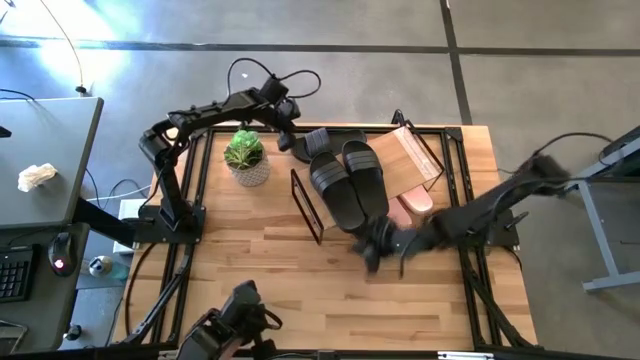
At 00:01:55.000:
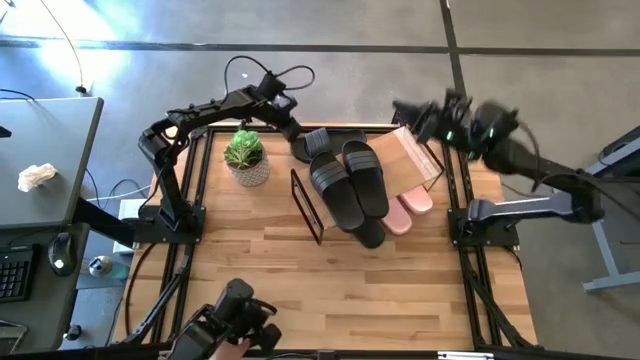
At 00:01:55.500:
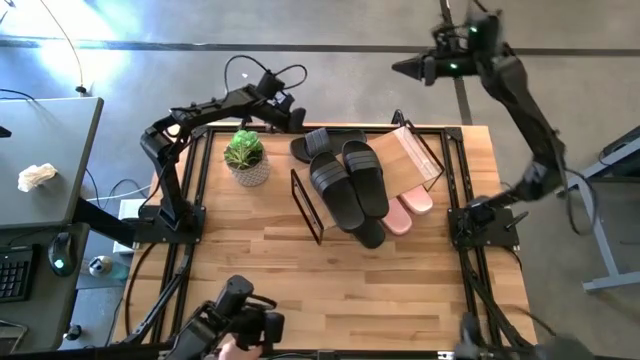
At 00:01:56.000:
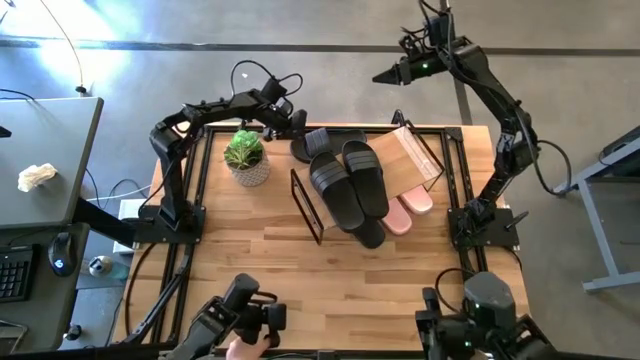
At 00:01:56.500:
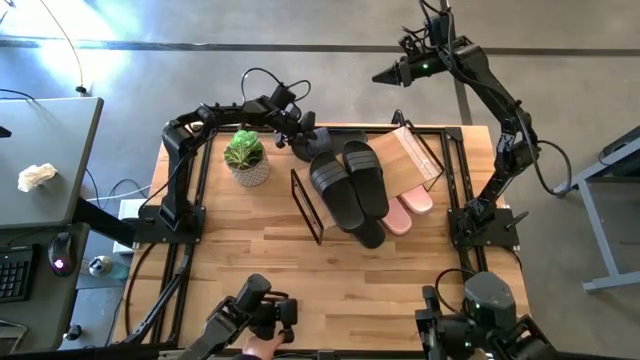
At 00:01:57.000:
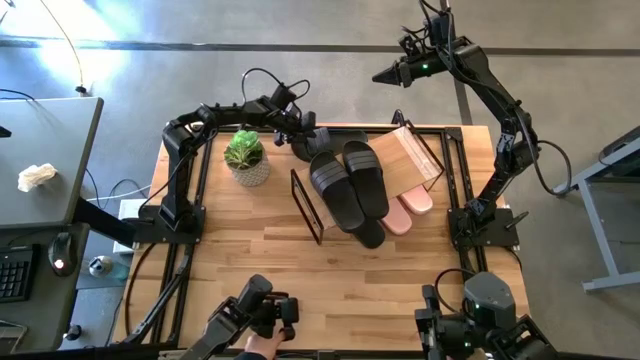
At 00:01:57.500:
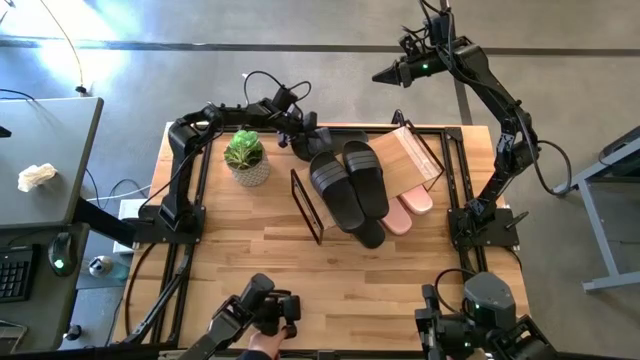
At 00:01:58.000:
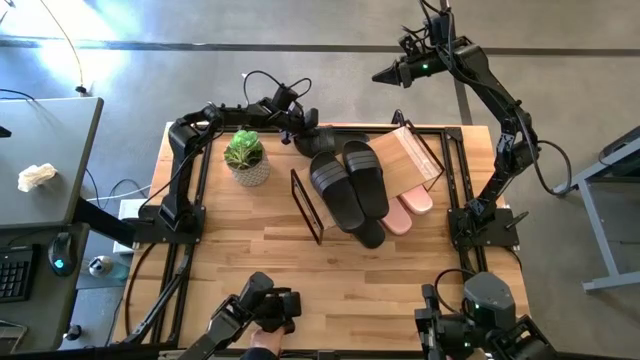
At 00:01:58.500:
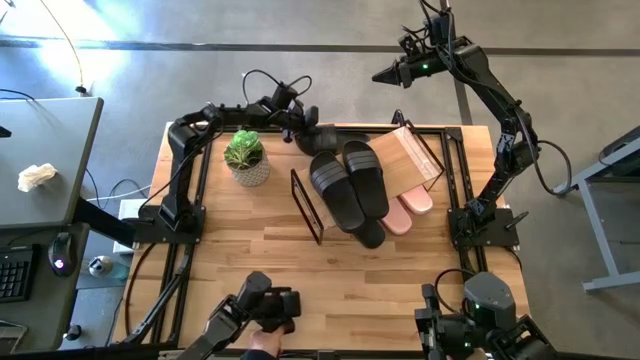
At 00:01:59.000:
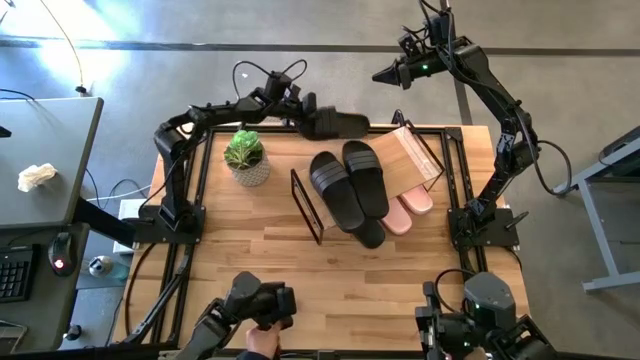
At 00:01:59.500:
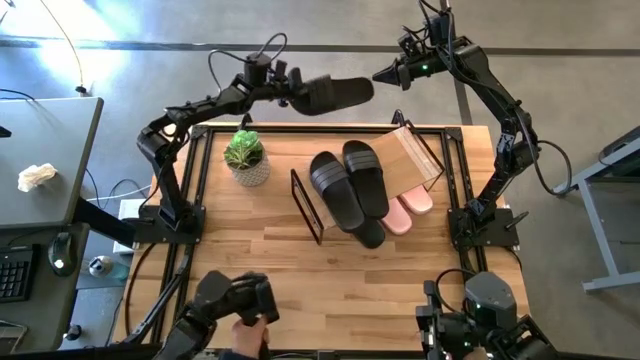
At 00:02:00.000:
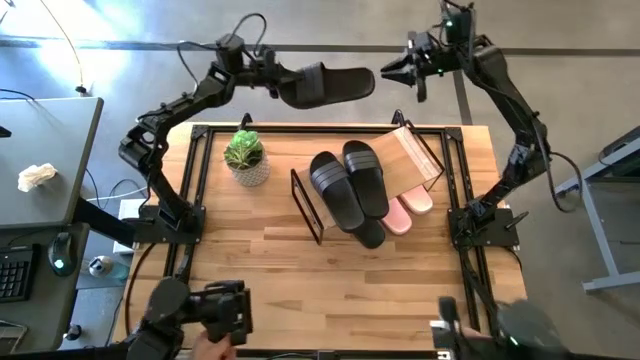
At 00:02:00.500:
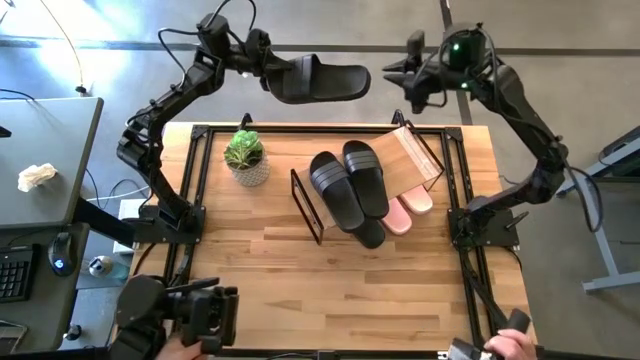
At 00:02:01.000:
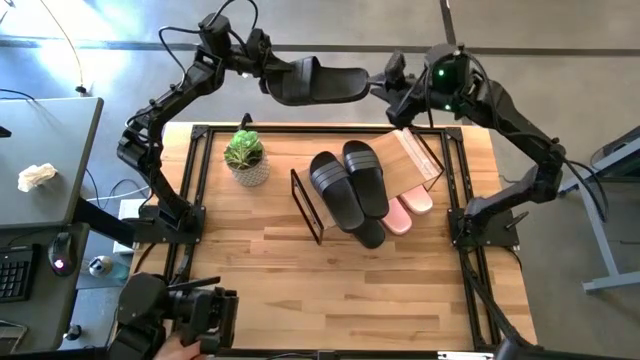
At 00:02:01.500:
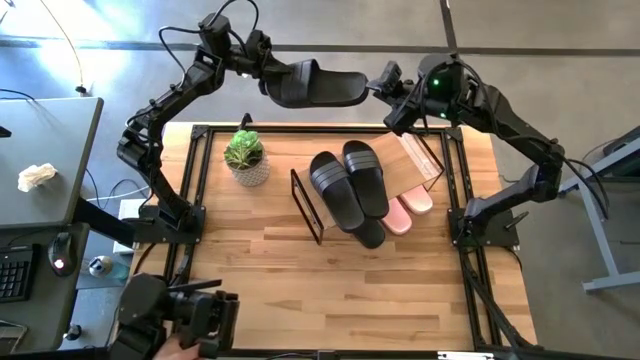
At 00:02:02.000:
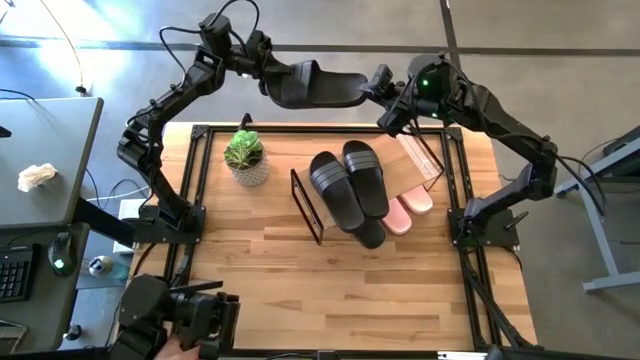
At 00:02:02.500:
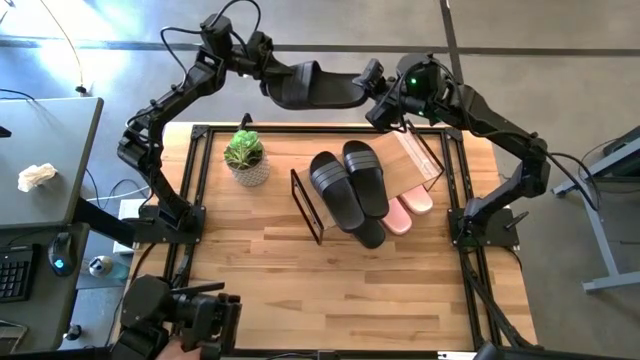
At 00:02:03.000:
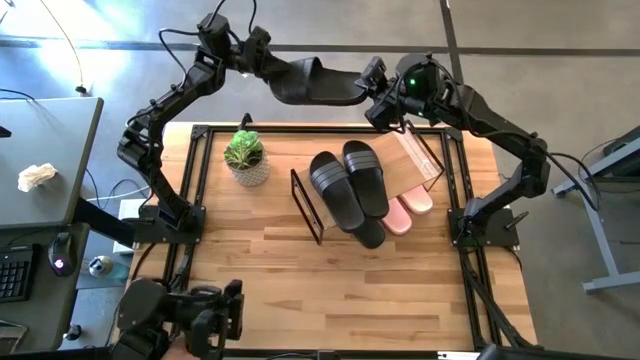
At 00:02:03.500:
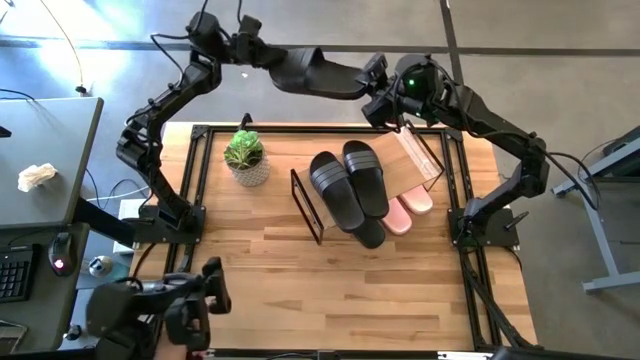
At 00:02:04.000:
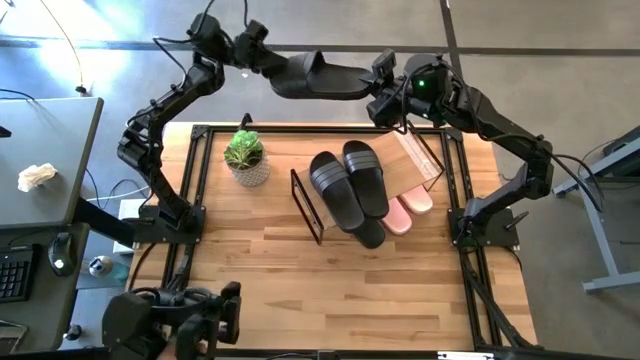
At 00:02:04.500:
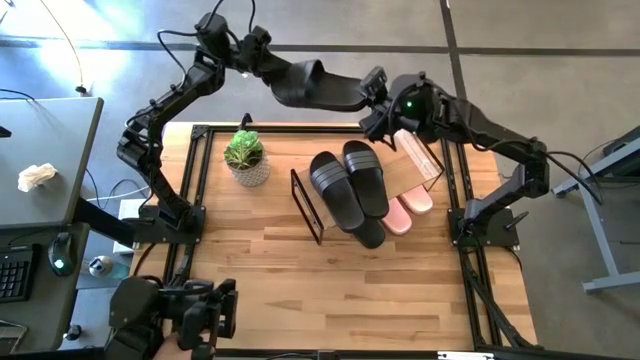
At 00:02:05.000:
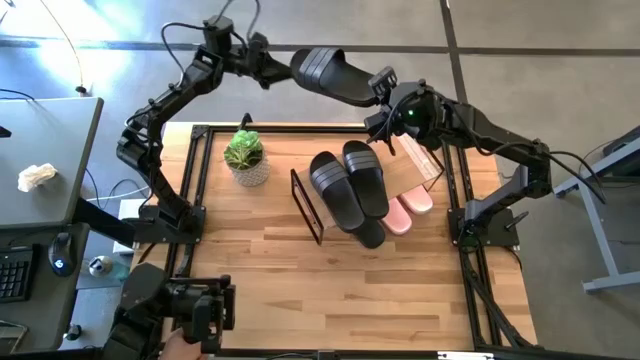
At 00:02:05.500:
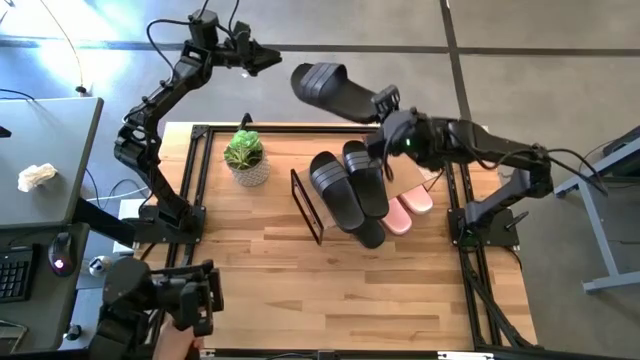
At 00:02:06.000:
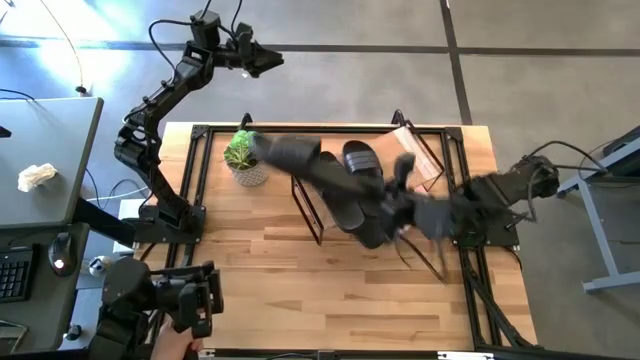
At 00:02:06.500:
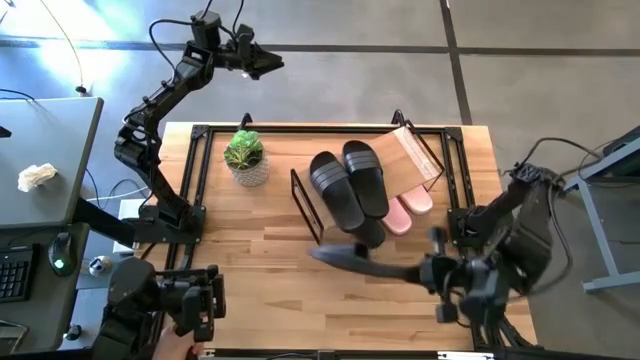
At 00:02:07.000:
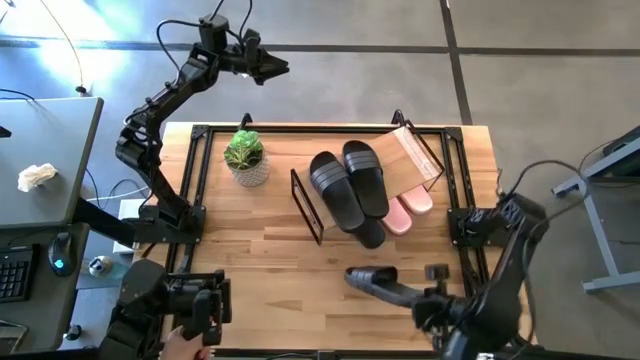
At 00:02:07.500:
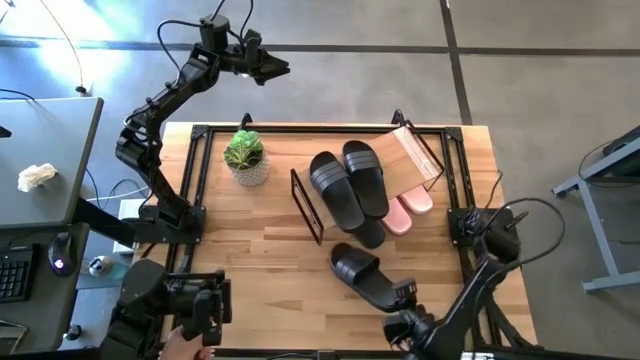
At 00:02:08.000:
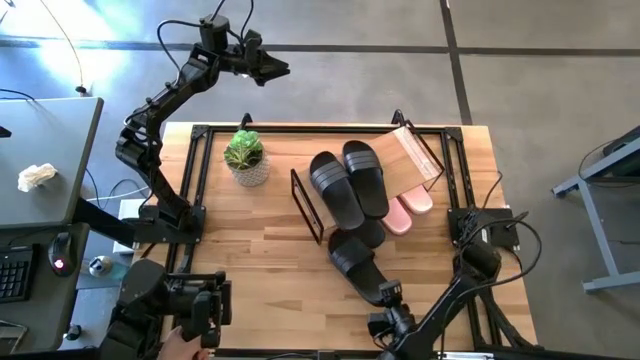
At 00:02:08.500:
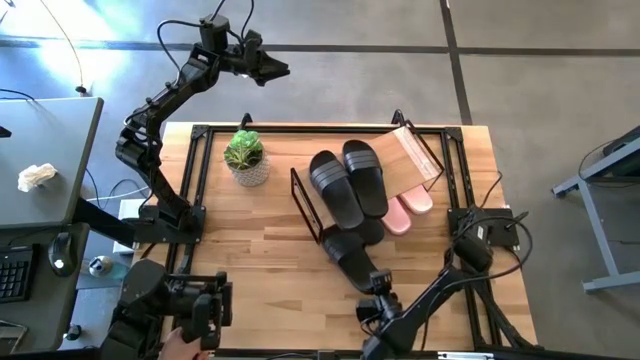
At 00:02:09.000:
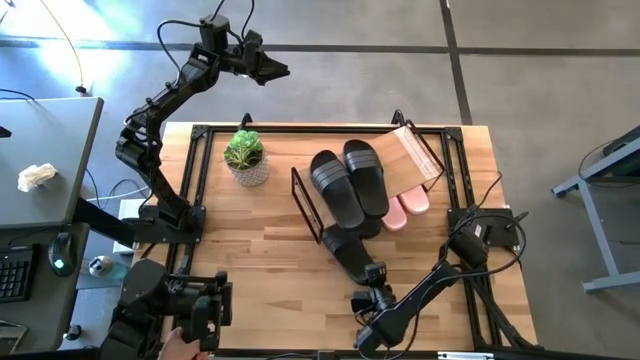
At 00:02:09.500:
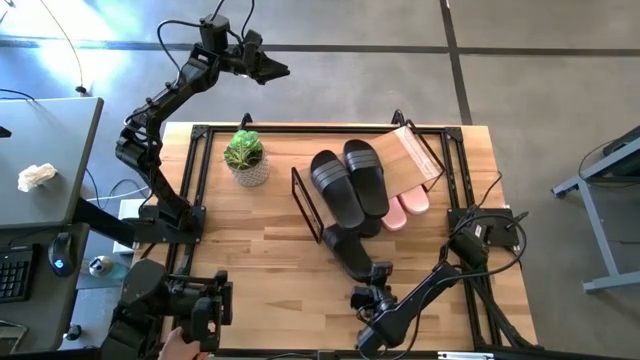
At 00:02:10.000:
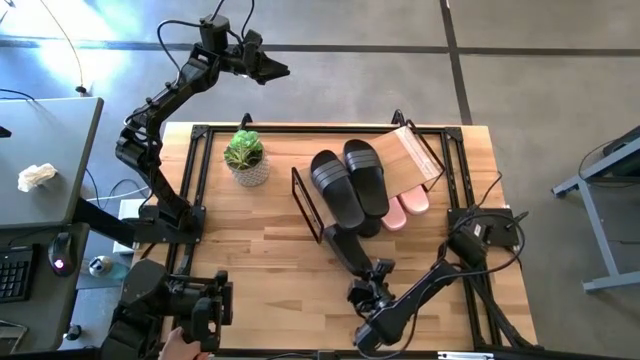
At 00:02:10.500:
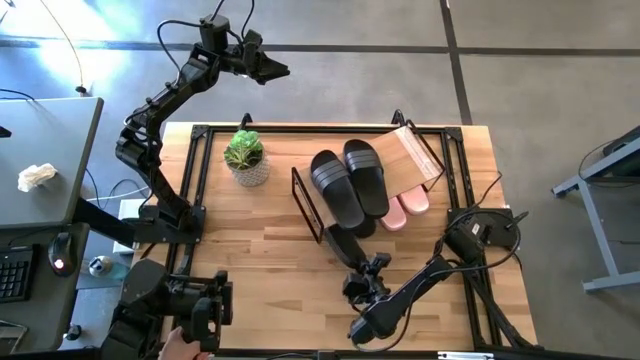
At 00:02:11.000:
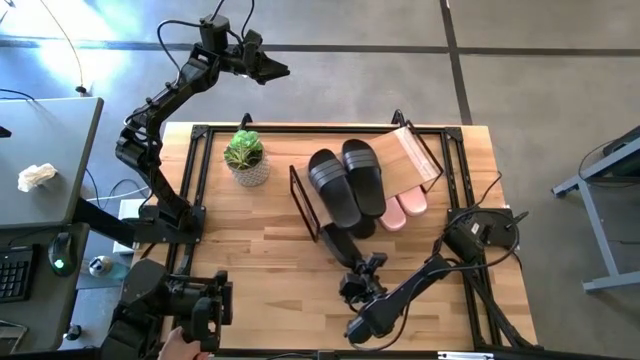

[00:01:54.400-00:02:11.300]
Task: Pick and place slides into the shelf
Put the black slipper under the shelf

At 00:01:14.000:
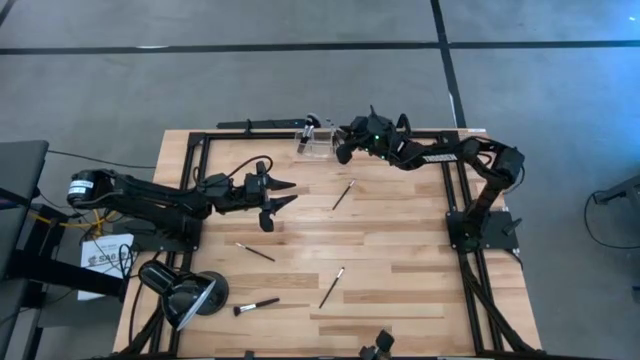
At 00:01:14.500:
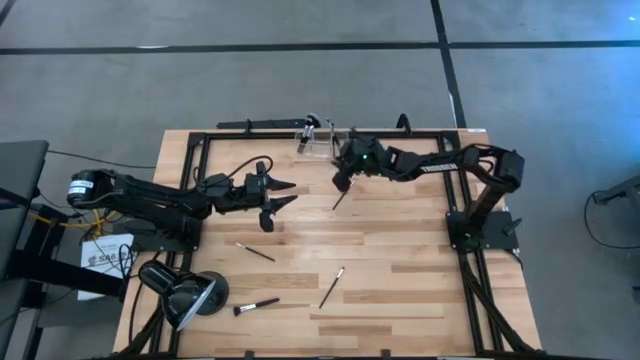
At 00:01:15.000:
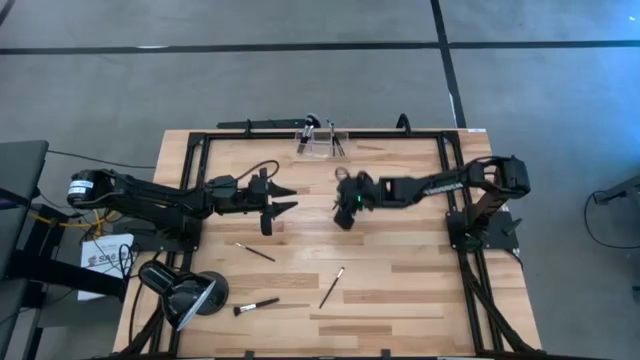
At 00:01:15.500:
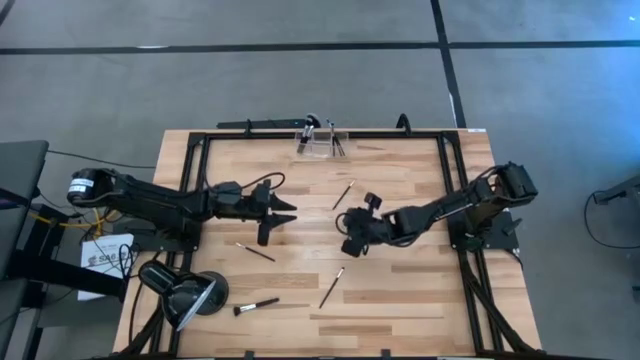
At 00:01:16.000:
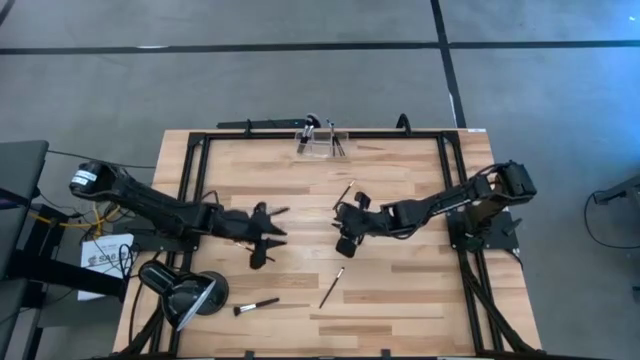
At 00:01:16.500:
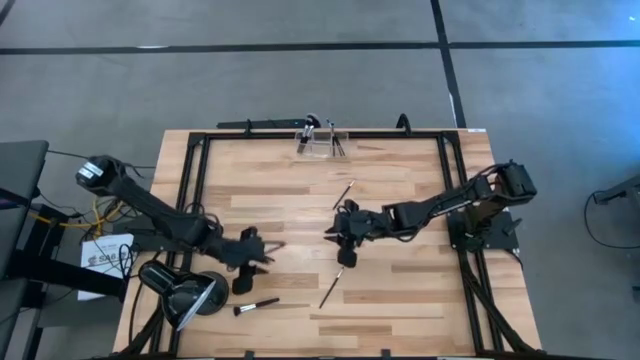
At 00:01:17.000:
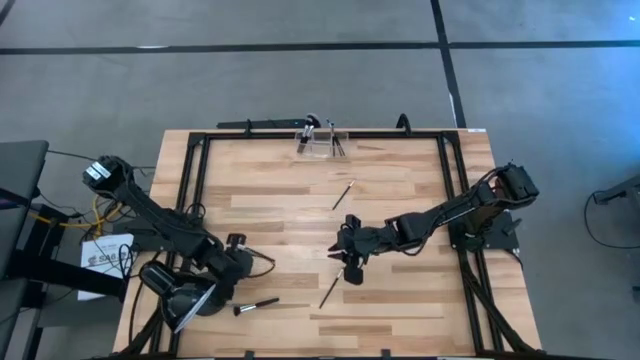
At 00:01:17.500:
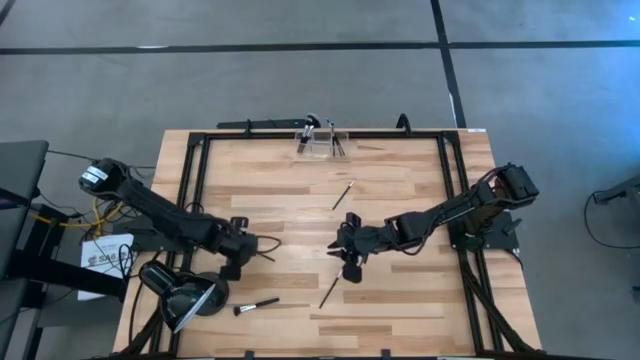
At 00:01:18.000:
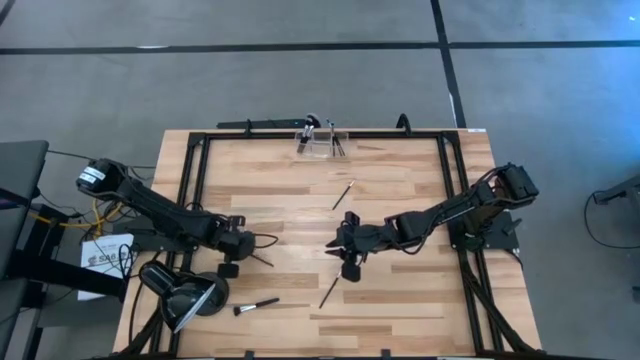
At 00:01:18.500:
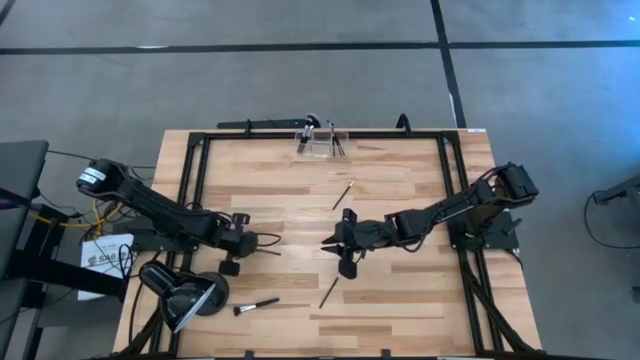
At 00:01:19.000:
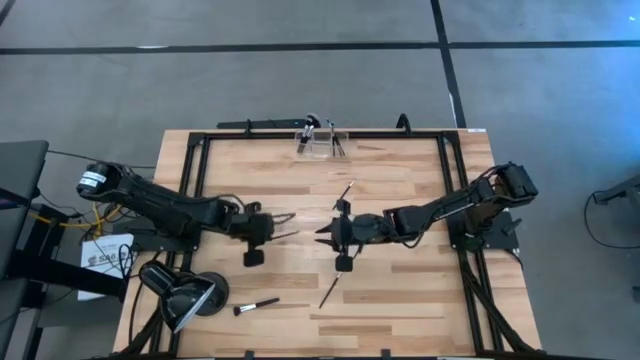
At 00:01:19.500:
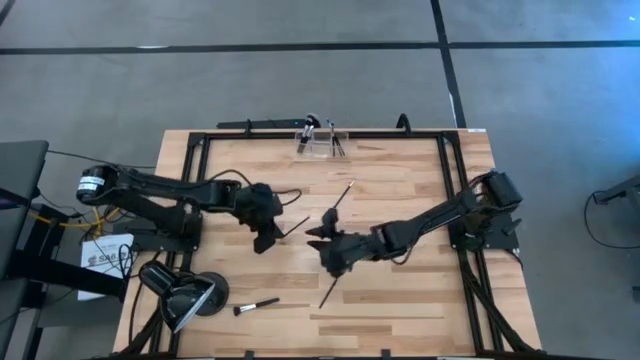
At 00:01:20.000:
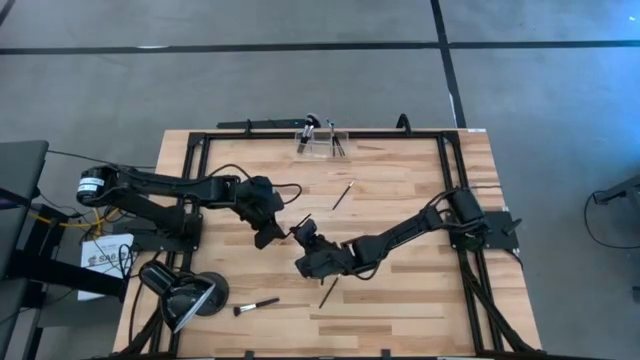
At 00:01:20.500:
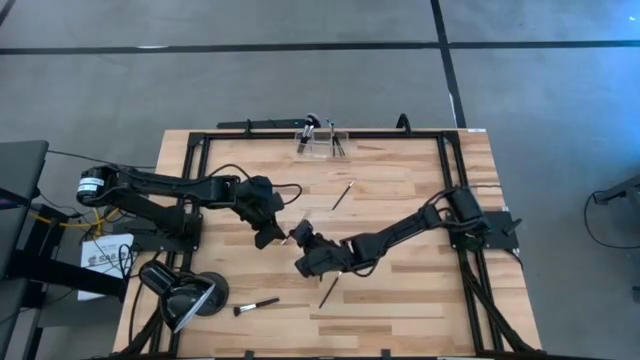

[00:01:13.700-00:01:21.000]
Task: Sort items
Put the eyeshadow brush into the right section of the transparent organizer
